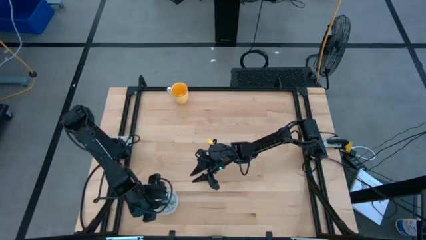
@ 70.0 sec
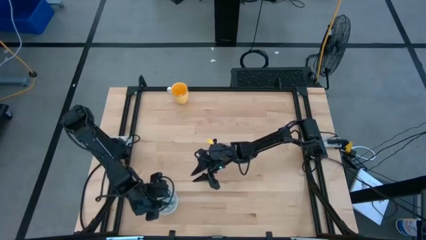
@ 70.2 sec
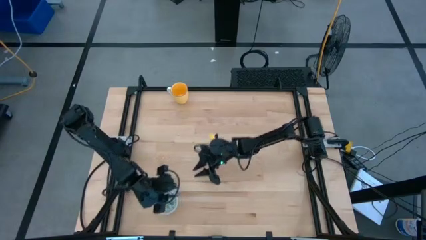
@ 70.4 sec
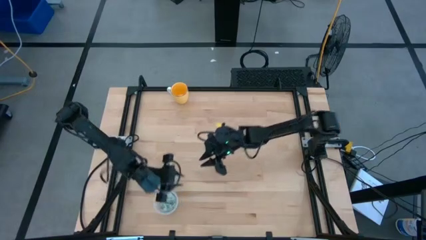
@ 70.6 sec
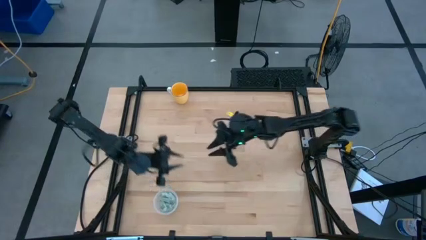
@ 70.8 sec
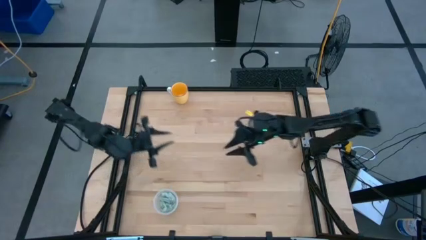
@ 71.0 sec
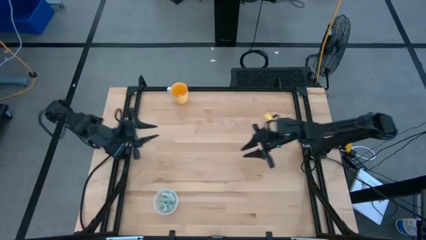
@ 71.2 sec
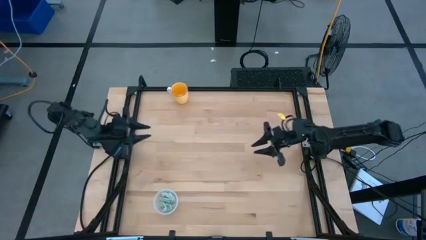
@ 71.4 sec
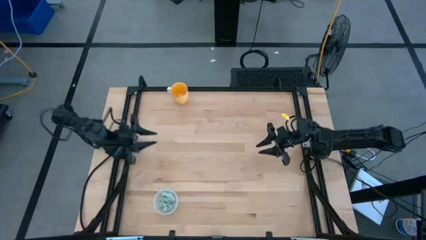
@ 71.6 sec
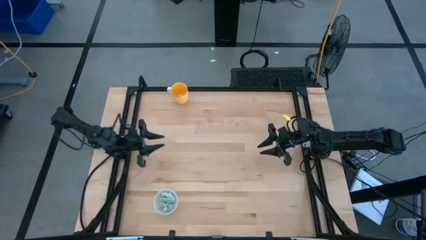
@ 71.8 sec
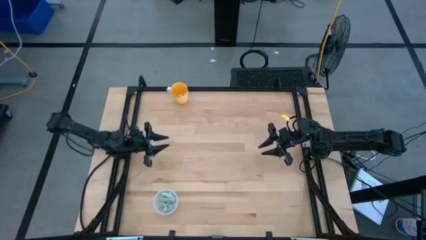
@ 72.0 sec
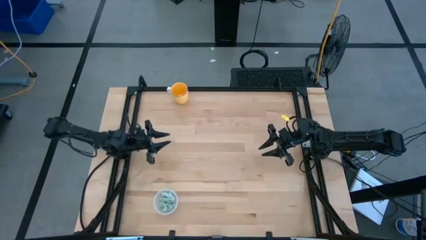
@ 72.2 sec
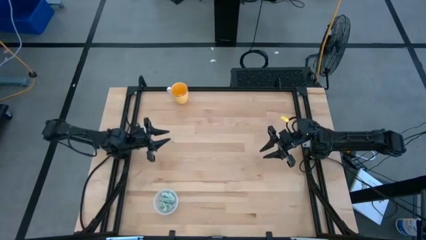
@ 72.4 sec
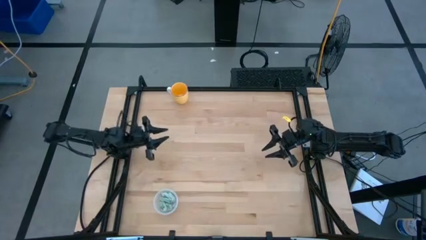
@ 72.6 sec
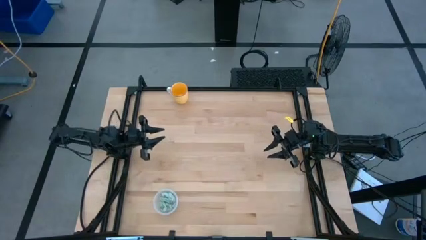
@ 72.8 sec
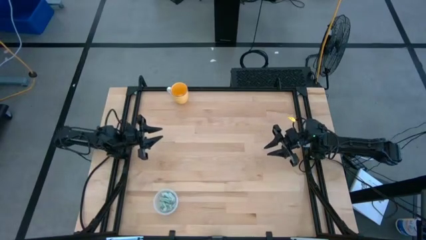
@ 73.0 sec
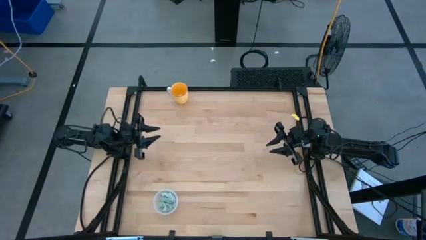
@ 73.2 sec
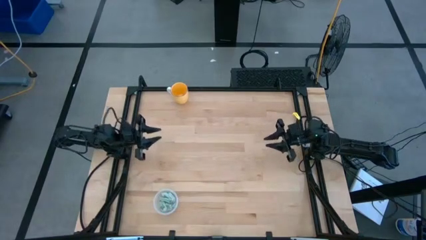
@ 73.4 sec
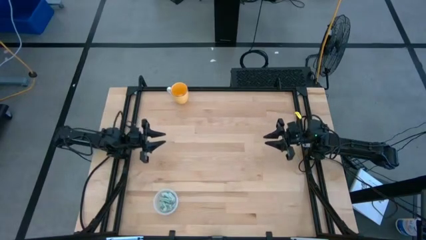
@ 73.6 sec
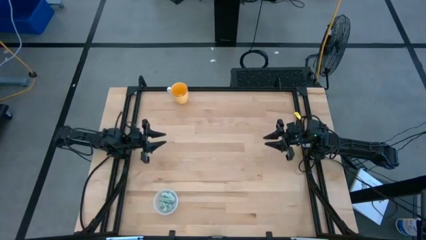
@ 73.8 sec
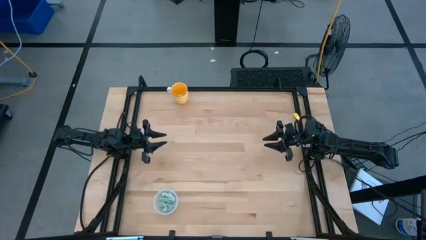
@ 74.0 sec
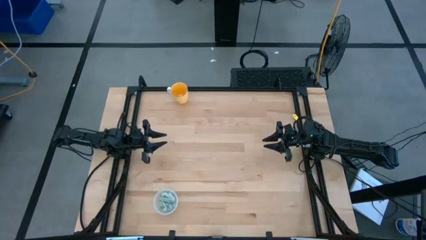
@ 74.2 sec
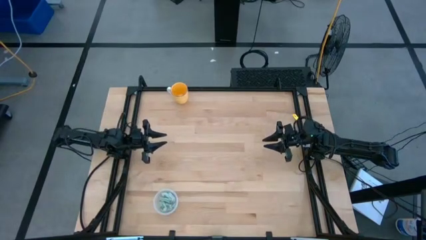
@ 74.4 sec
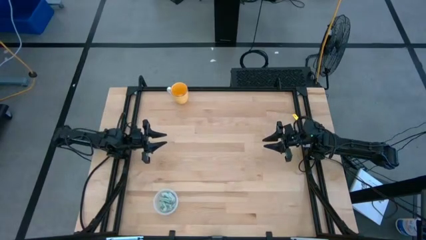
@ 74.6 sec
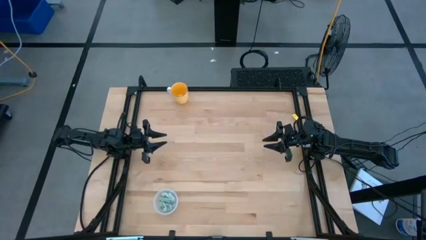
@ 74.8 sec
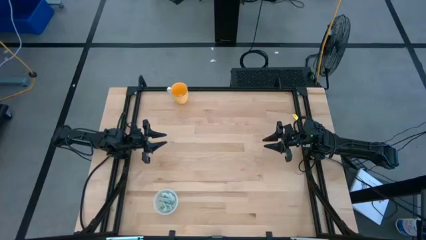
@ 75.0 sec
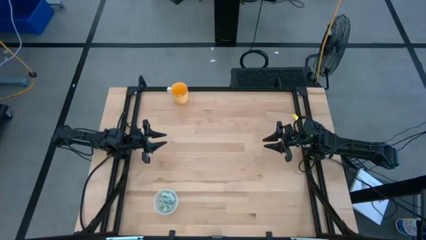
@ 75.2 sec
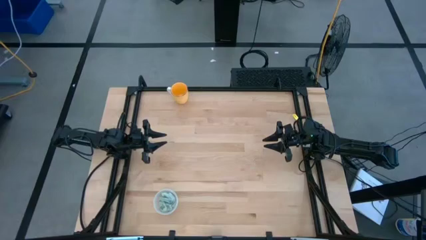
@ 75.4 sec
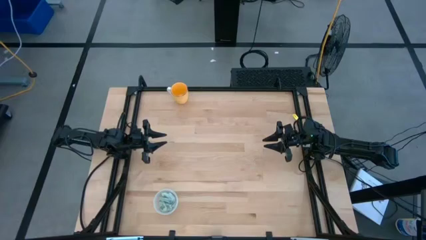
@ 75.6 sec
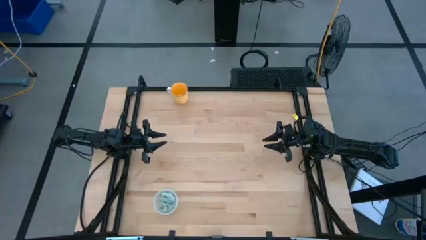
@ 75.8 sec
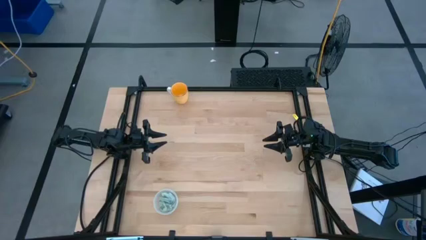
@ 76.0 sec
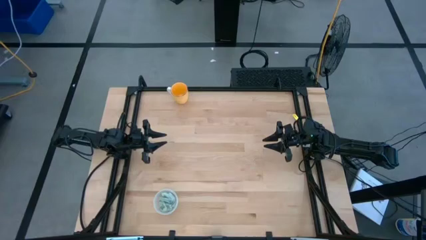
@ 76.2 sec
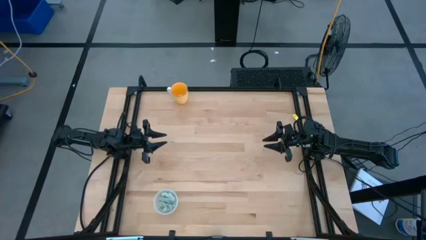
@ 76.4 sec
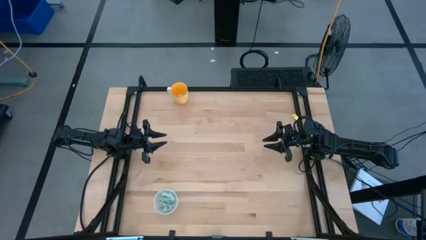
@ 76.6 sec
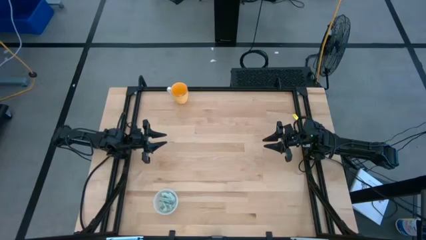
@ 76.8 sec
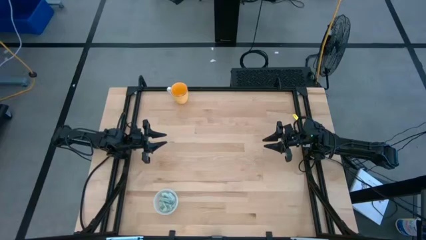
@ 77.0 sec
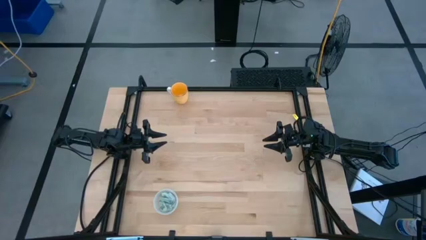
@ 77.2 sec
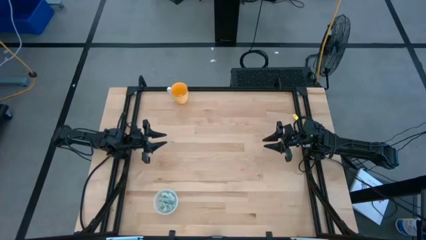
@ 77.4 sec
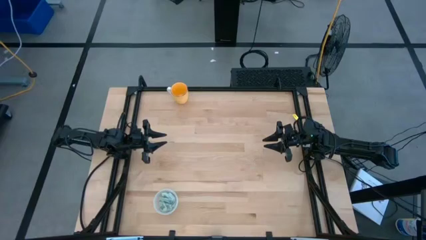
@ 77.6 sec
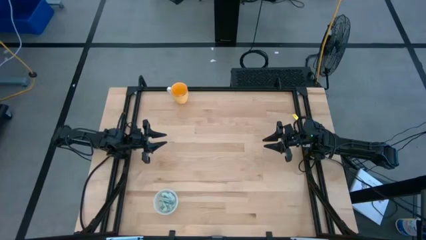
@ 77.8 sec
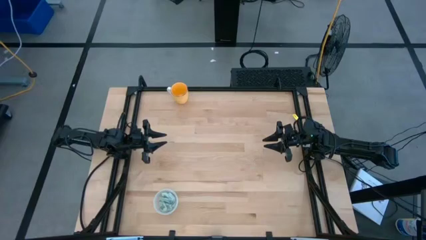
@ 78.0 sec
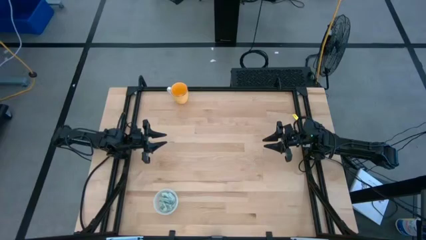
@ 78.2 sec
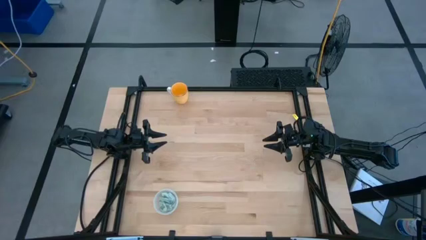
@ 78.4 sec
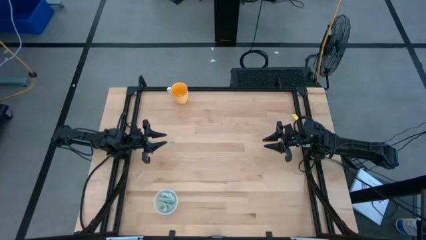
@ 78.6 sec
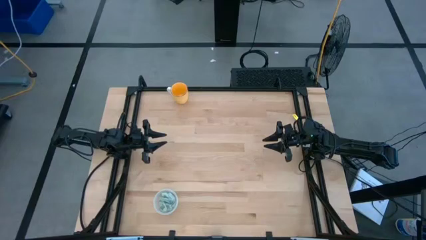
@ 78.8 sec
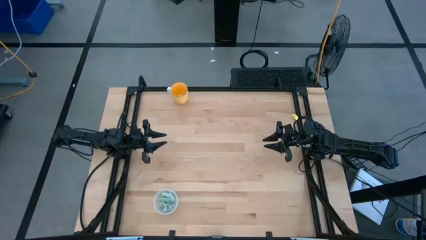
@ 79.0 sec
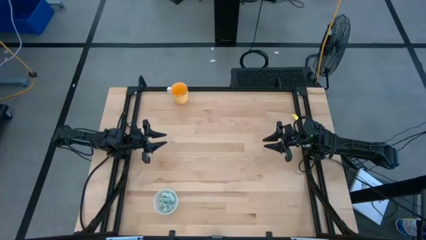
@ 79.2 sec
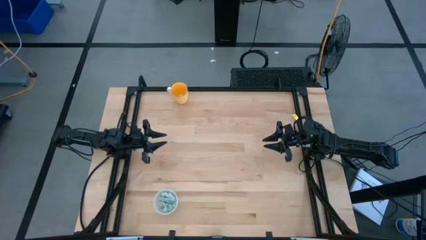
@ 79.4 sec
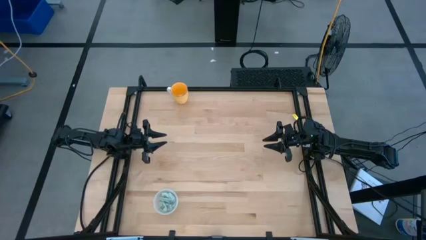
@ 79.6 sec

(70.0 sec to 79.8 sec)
Task: Pick and place Stevia / Truvia into bins
Return to Home Position
